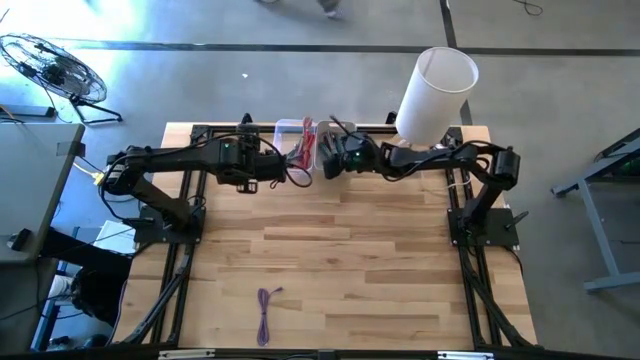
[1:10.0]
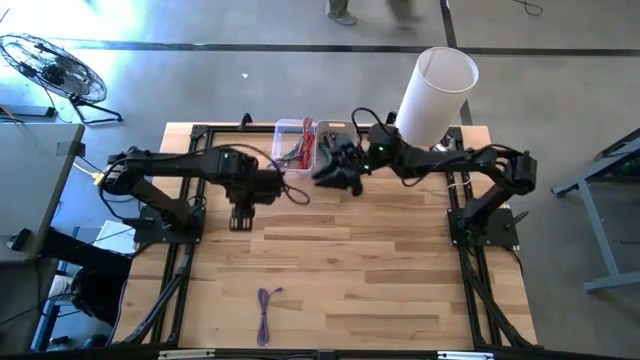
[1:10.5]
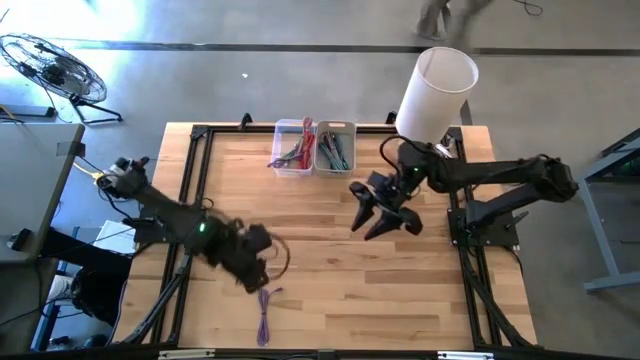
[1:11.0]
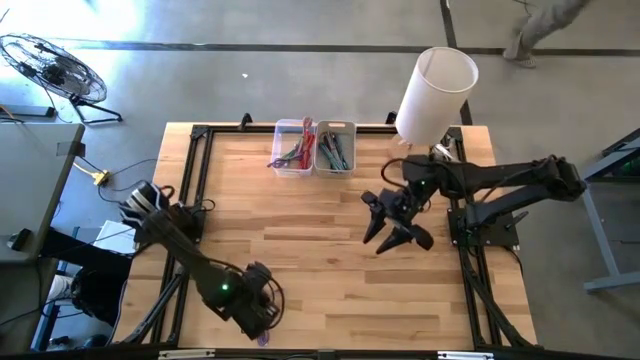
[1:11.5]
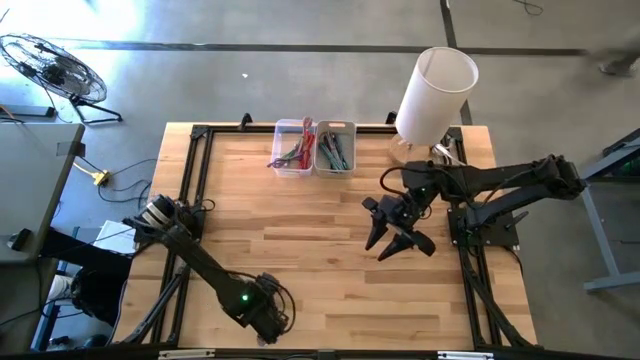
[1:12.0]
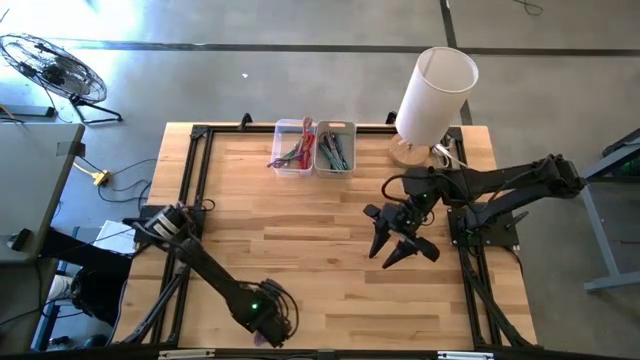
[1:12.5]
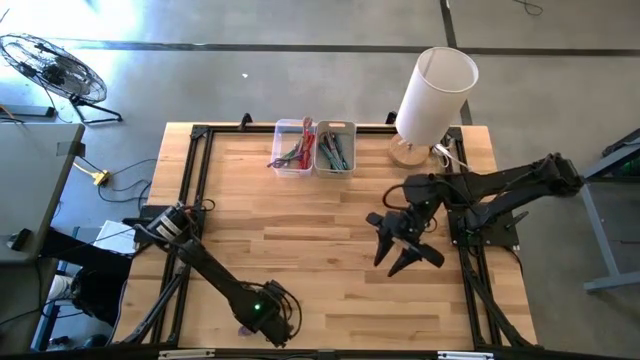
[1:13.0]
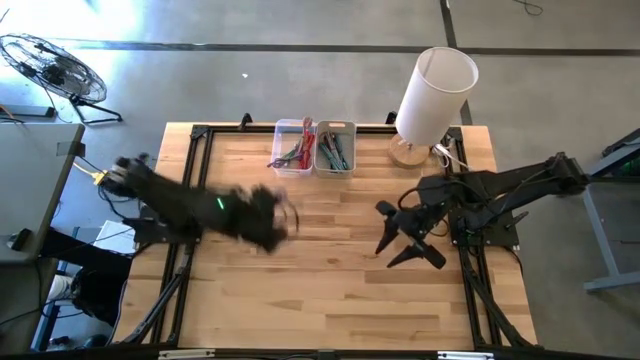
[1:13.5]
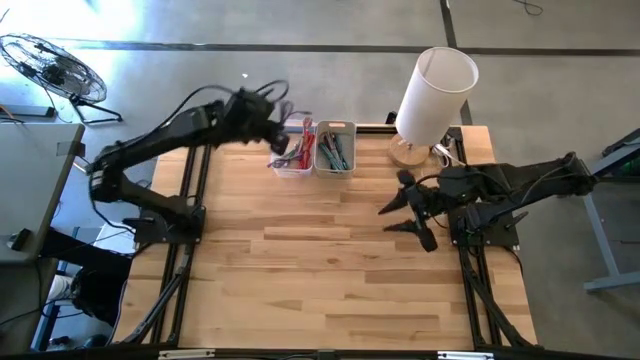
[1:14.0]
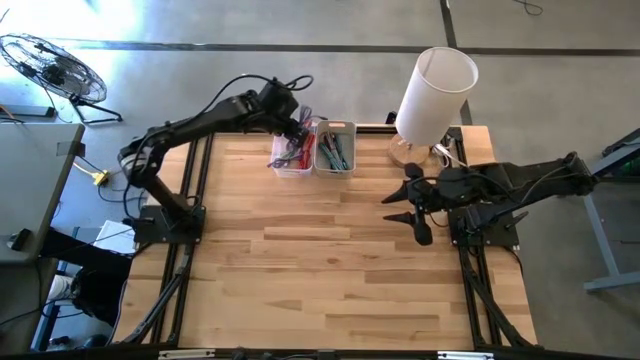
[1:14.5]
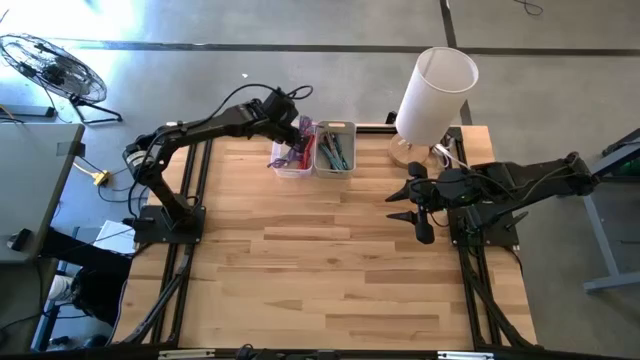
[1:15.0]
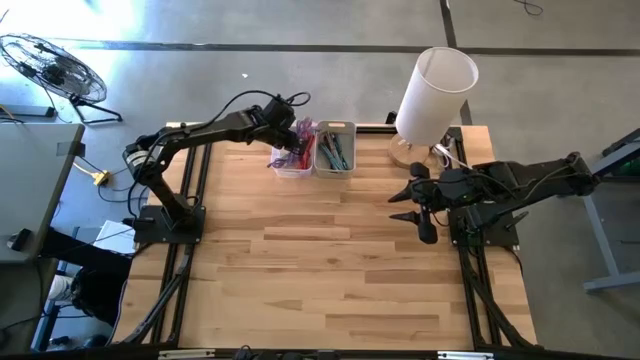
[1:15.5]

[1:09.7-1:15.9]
Task: Pick & Place USB Port
Put the purple charger cable into the transparent bin

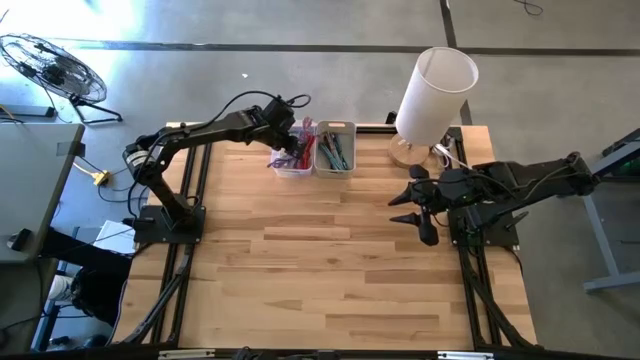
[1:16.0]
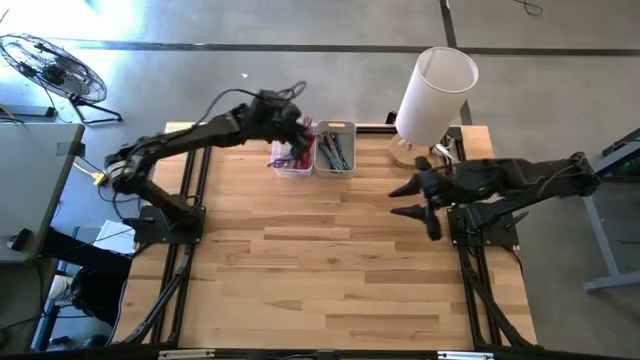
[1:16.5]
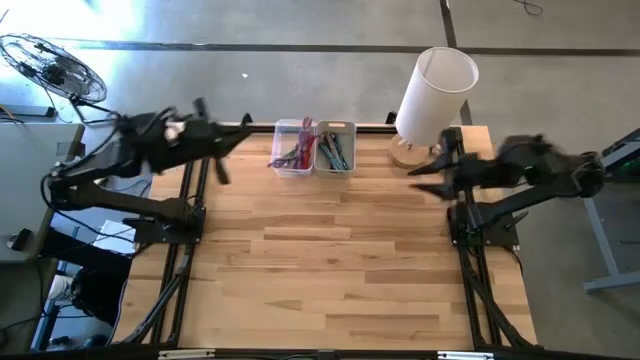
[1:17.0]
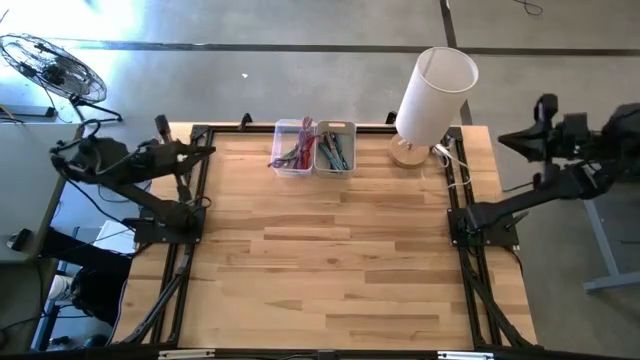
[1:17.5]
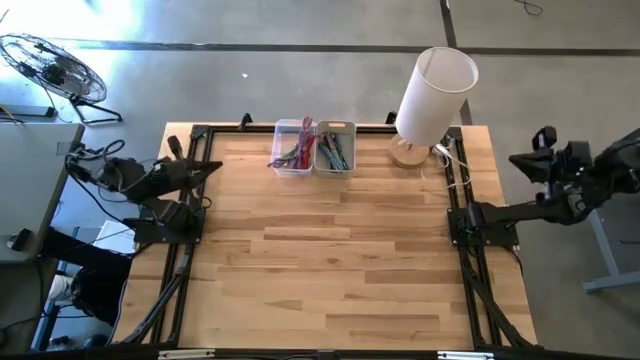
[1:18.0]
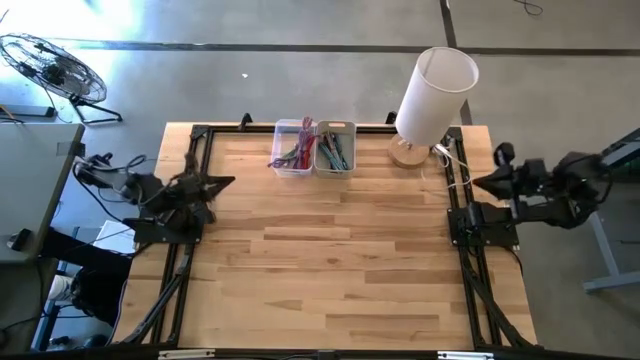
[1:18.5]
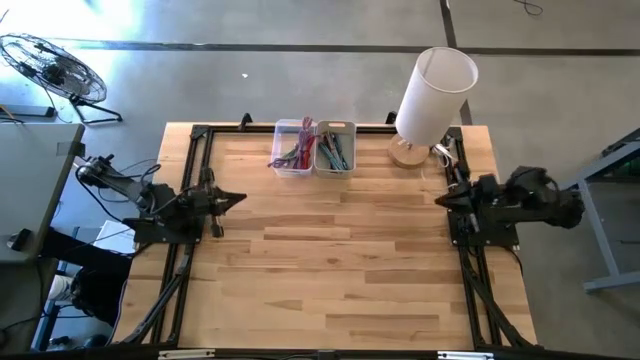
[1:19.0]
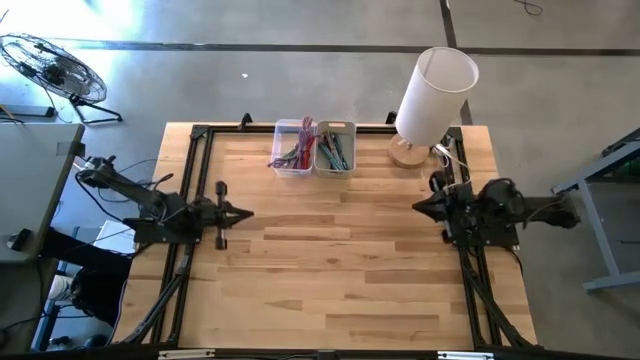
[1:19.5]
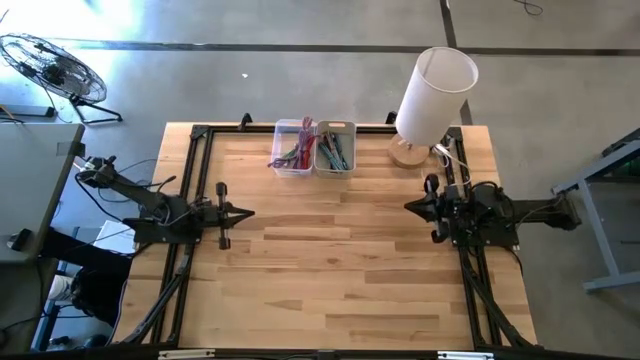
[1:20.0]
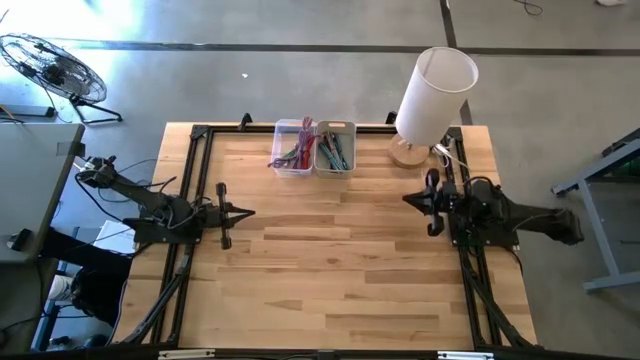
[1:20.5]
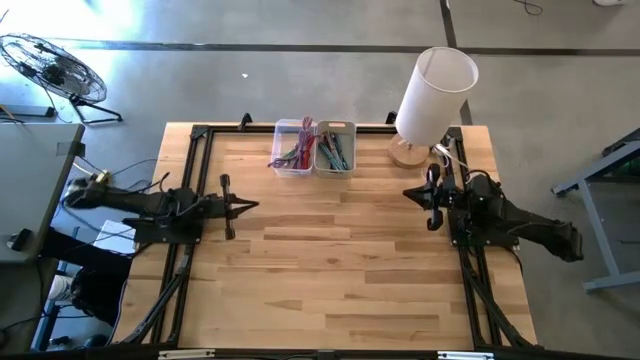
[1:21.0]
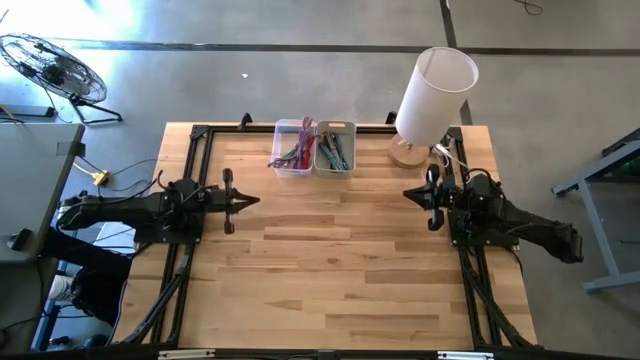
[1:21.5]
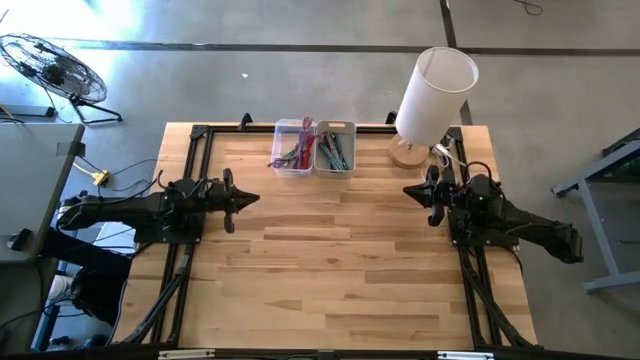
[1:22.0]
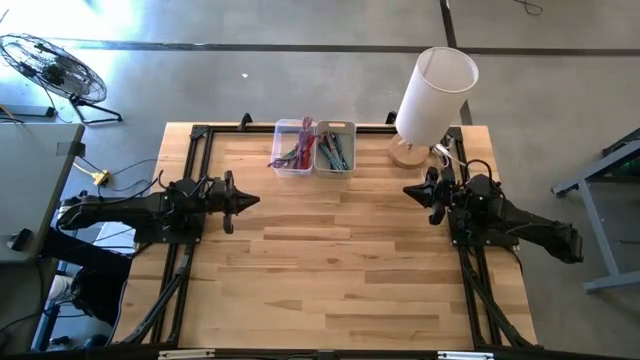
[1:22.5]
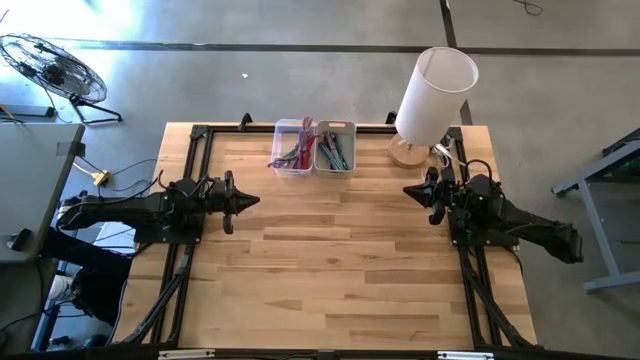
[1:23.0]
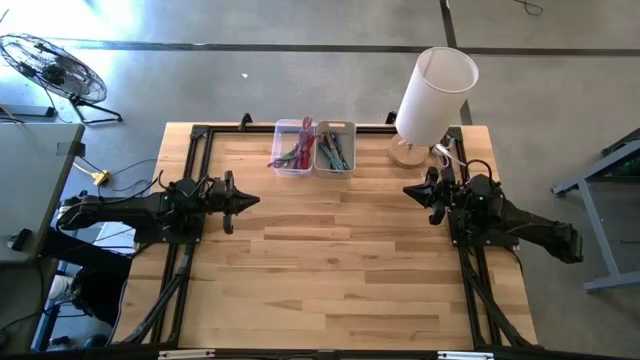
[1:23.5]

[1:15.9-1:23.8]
Return to Home Position

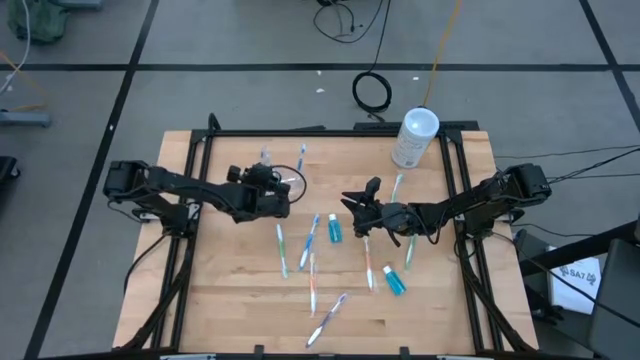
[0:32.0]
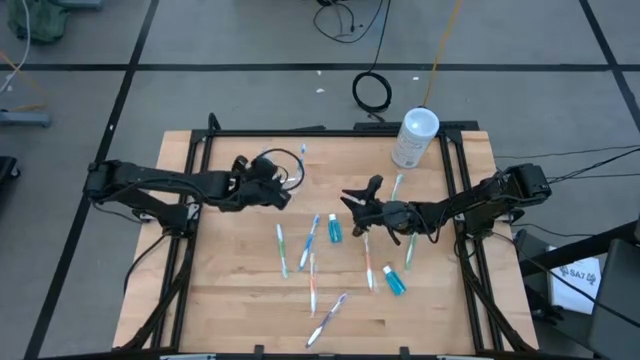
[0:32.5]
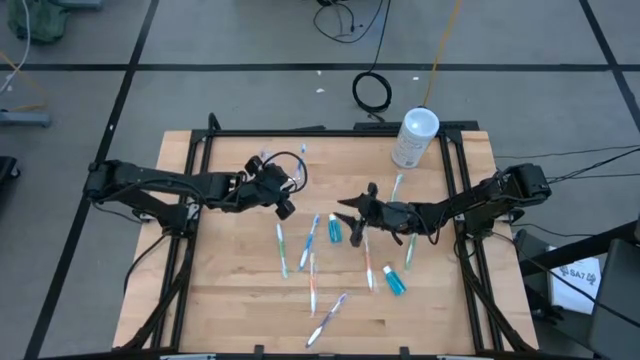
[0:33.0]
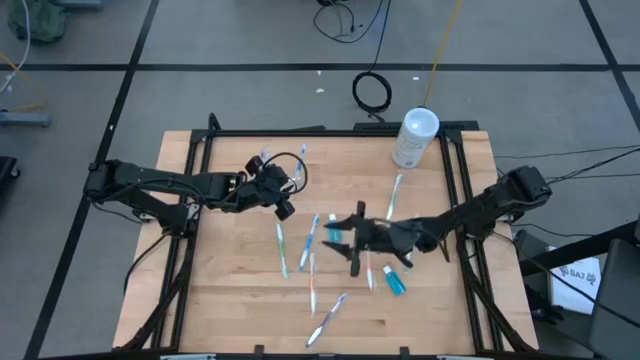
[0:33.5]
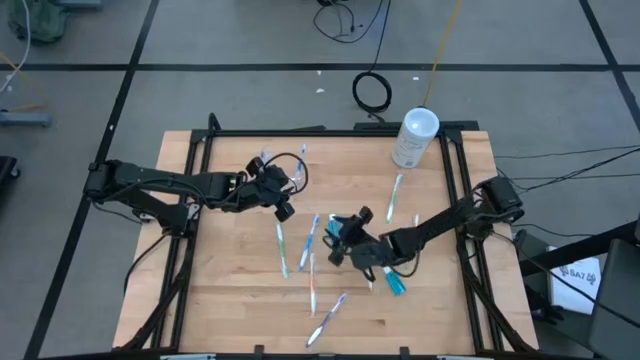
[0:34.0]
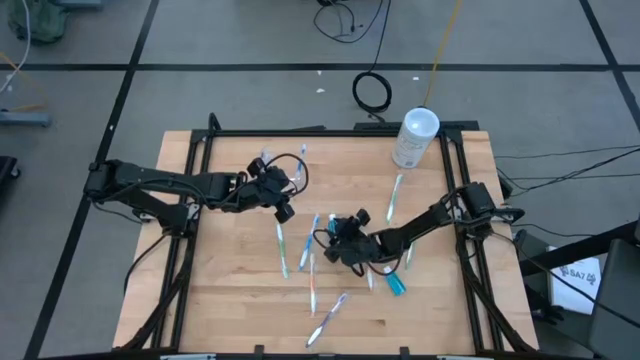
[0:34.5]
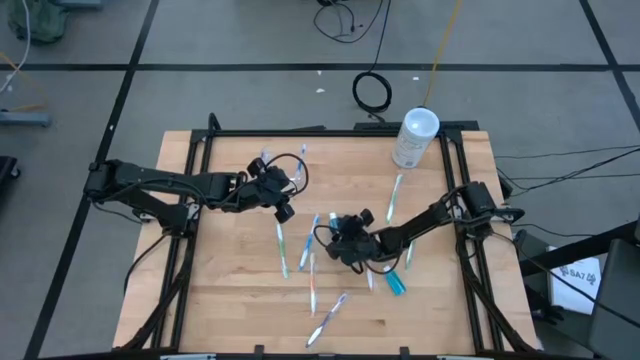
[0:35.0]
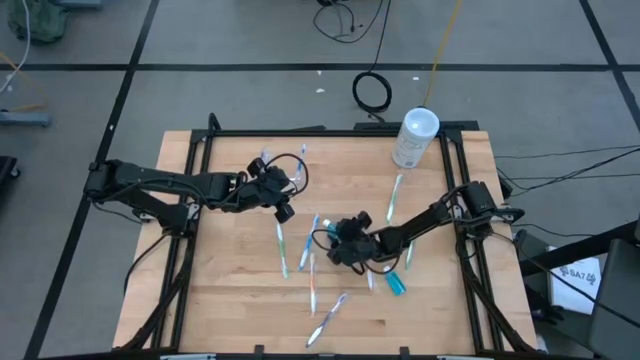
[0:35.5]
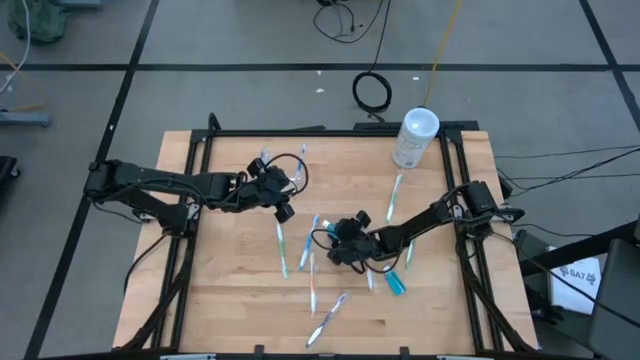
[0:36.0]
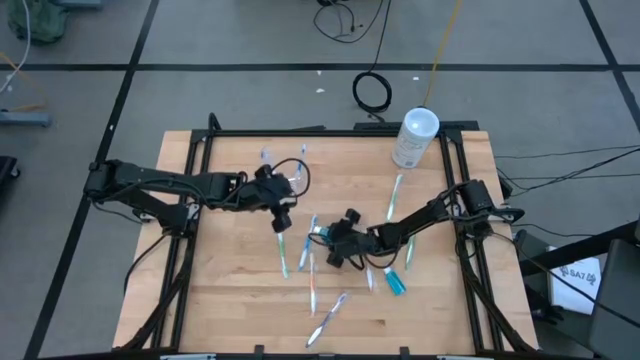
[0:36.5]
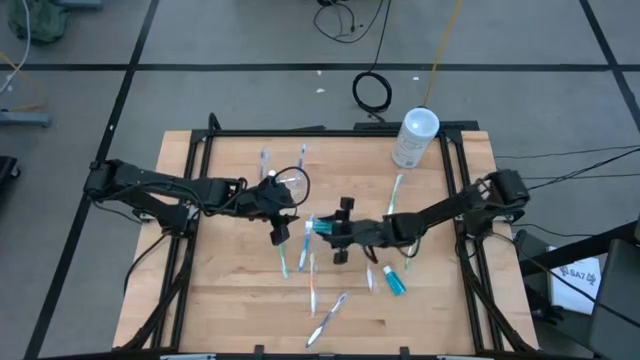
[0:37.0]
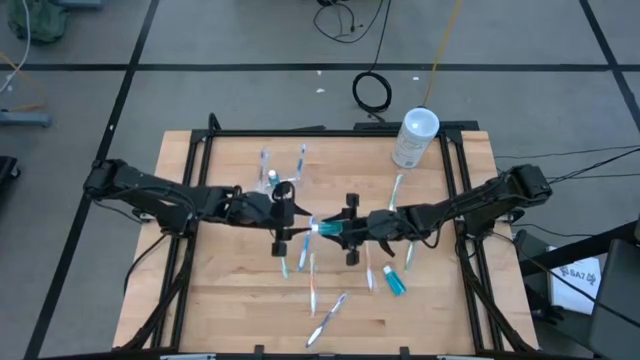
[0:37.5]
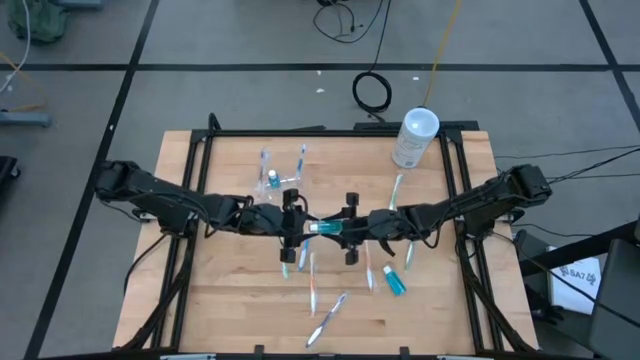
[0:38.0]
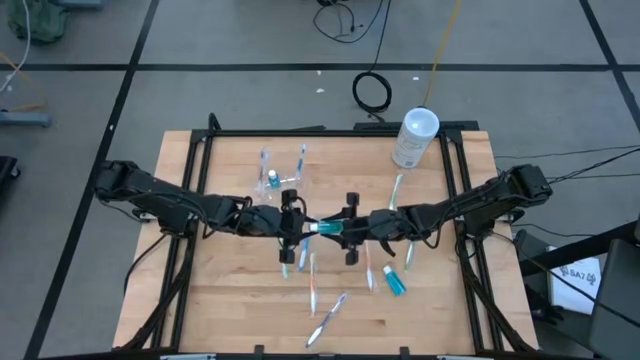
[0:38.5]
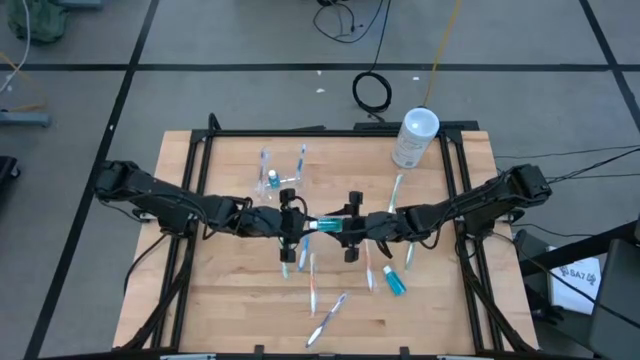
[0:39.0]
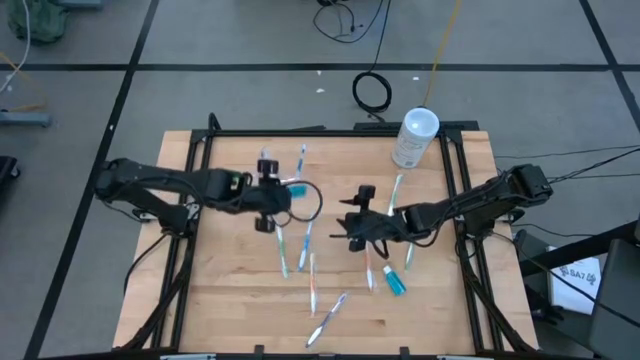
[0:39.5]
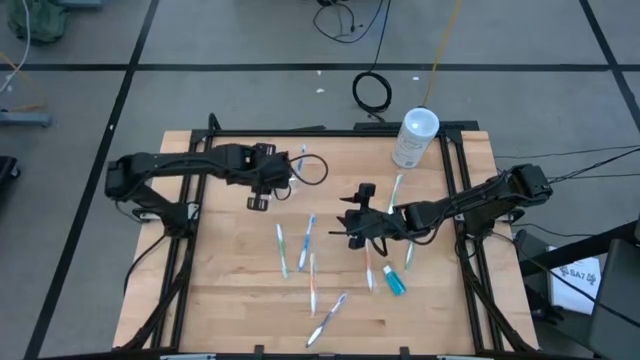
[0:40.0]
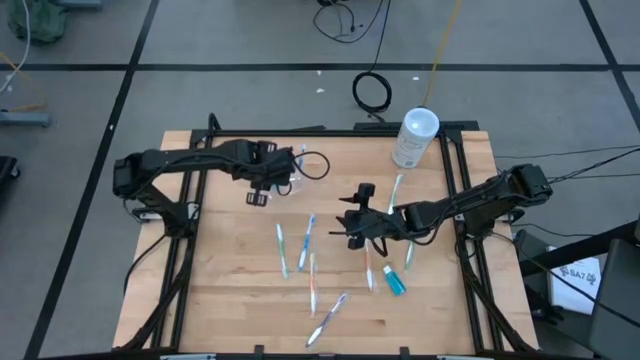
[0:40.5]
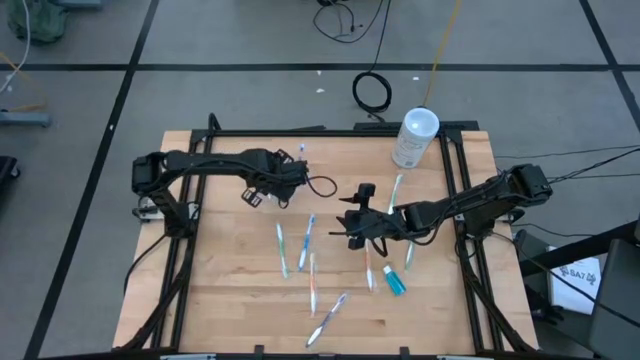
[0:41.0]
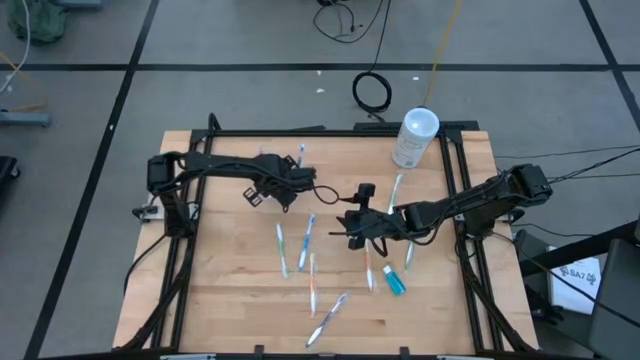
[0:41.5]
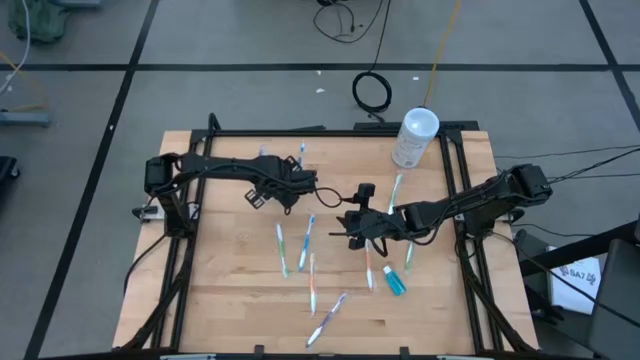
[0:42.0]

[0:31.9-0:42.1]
Task: Pick & Place toothbrushing station
Put the top blue mouthwash into the middle compartment of the transparent organizer
